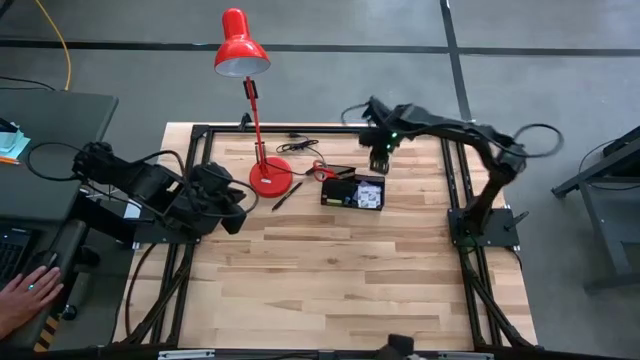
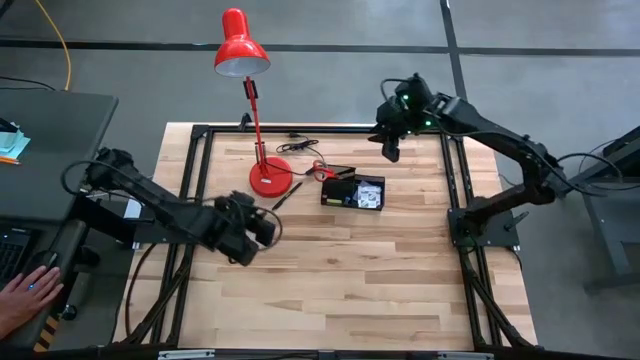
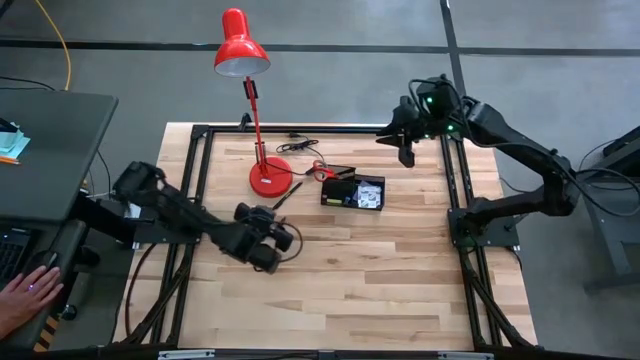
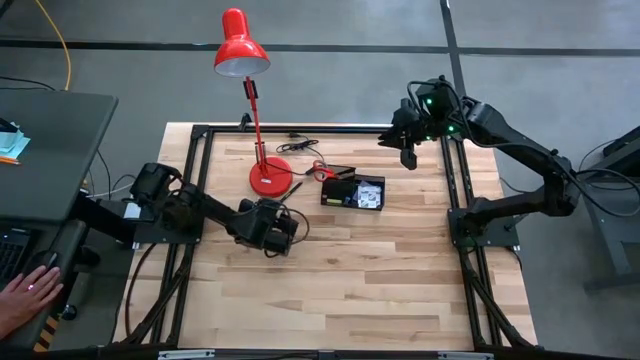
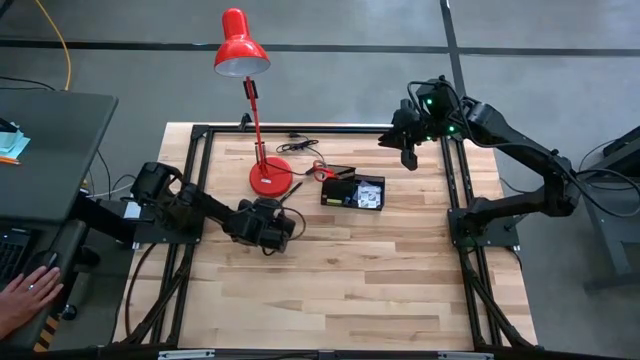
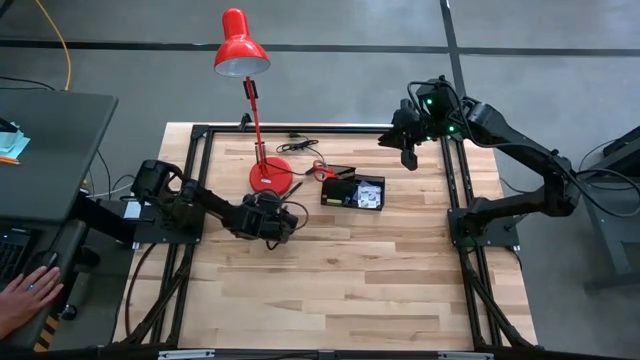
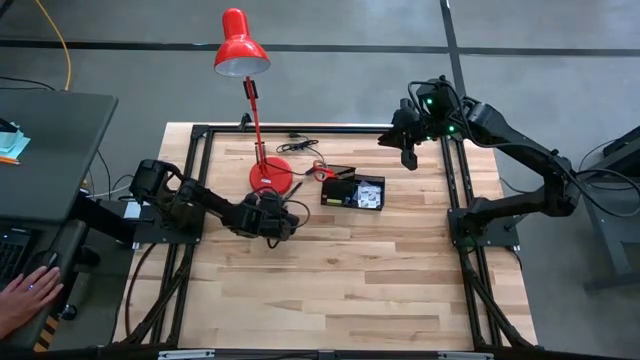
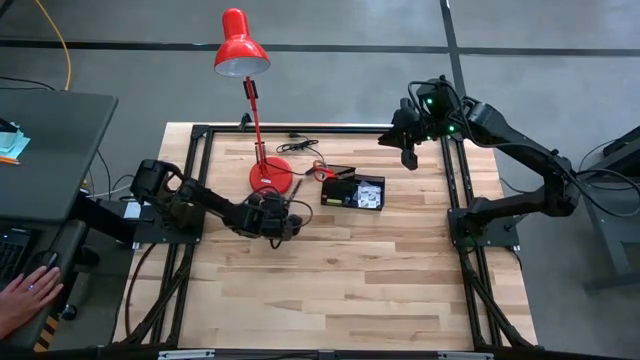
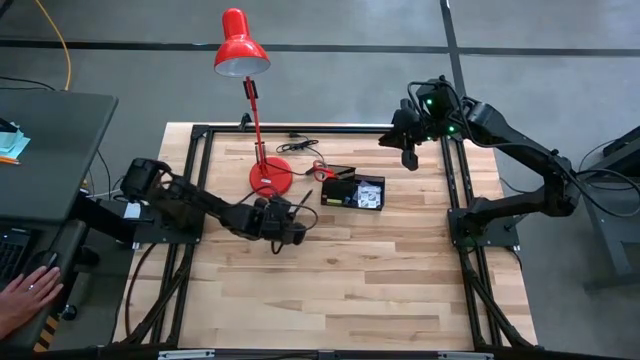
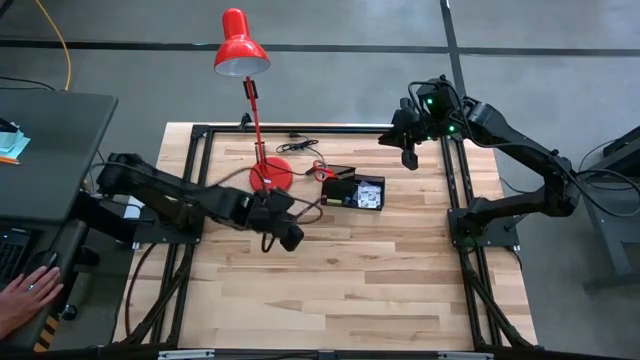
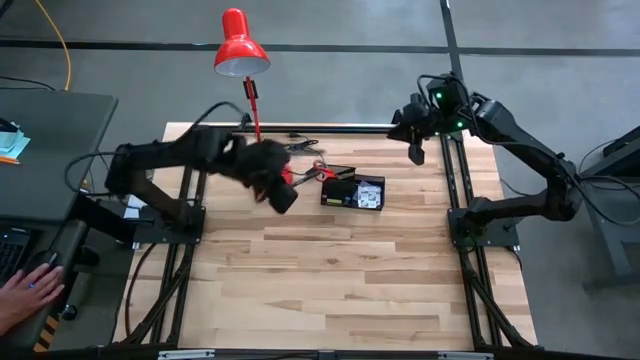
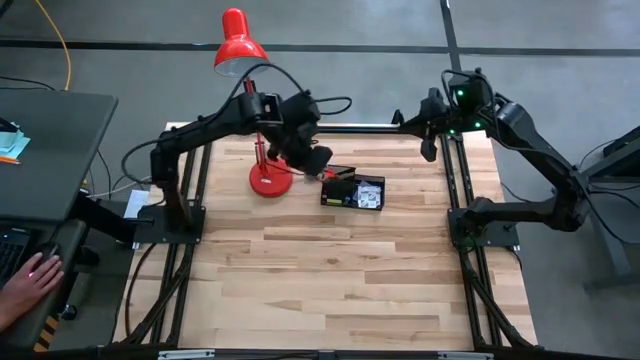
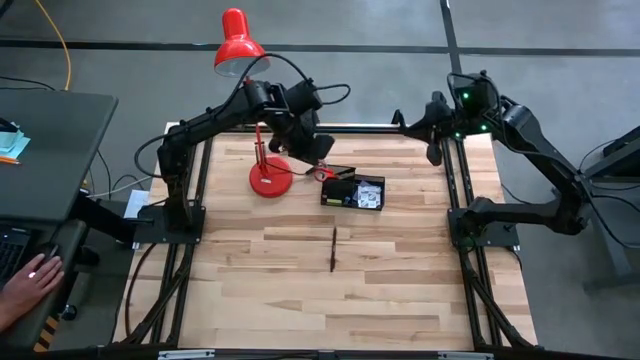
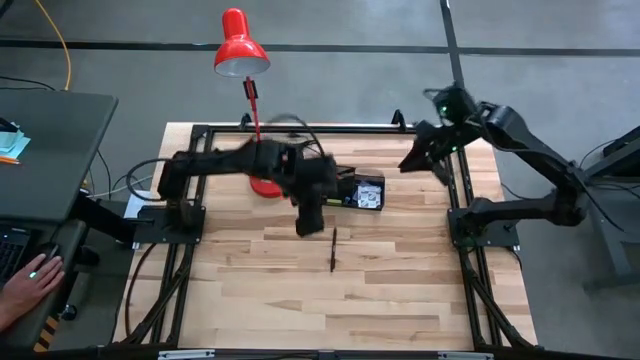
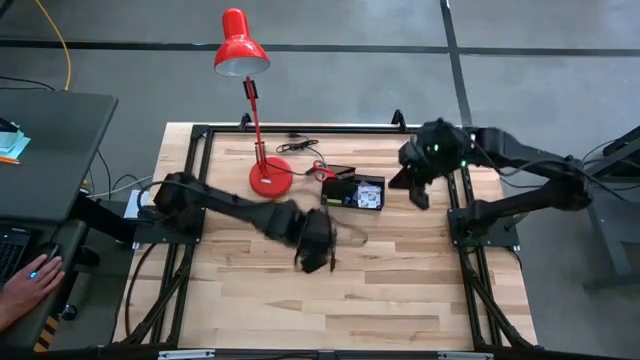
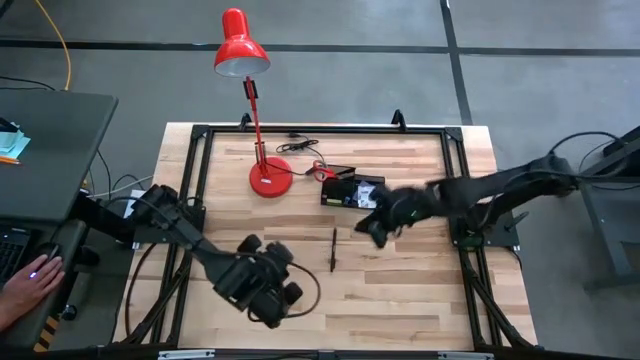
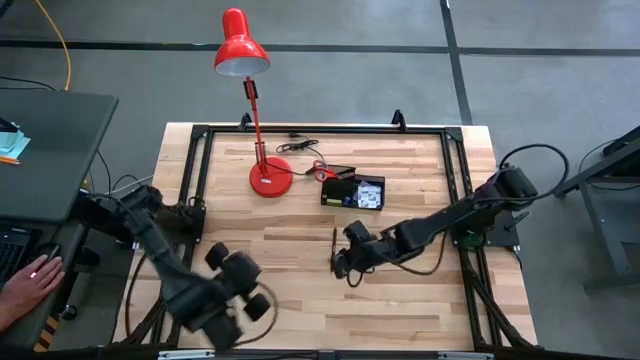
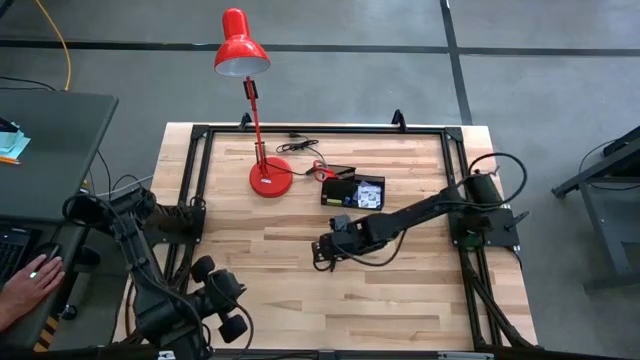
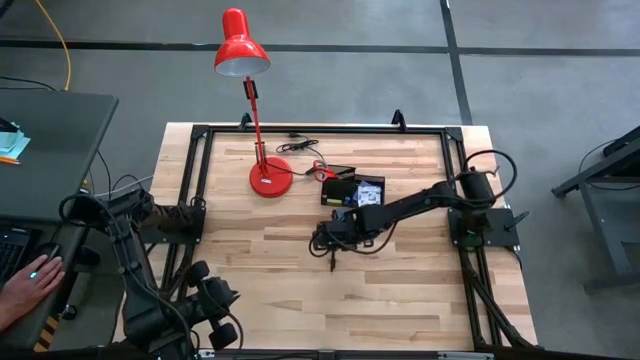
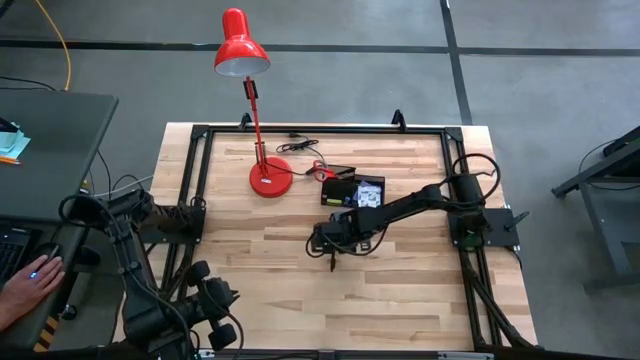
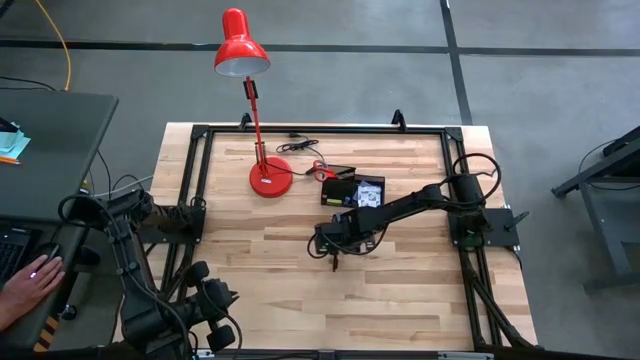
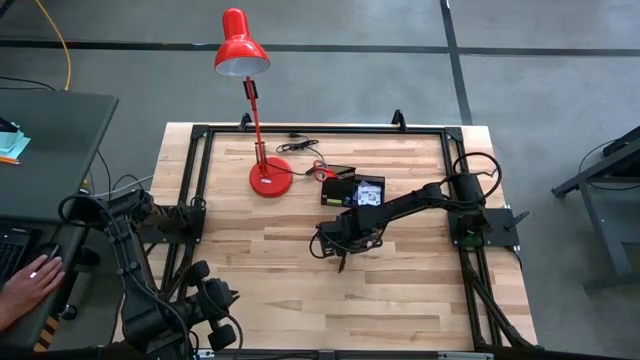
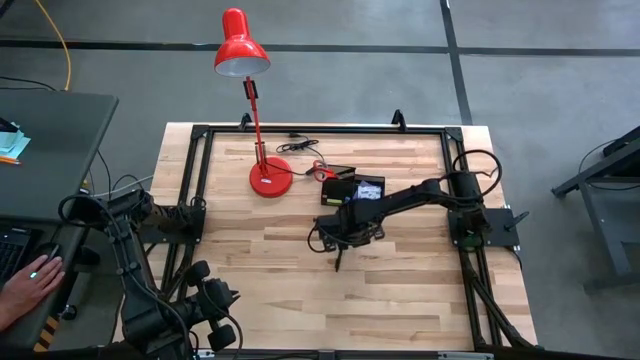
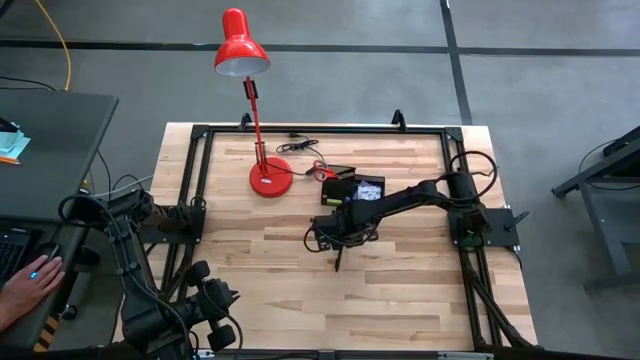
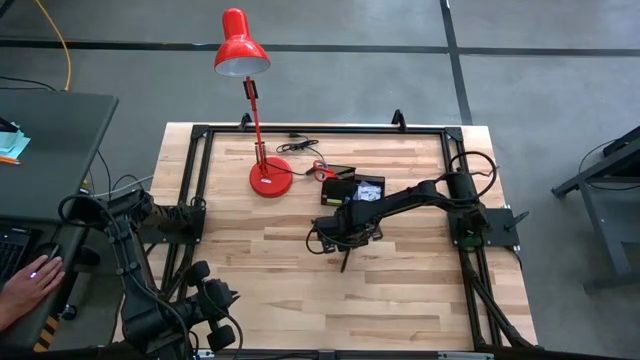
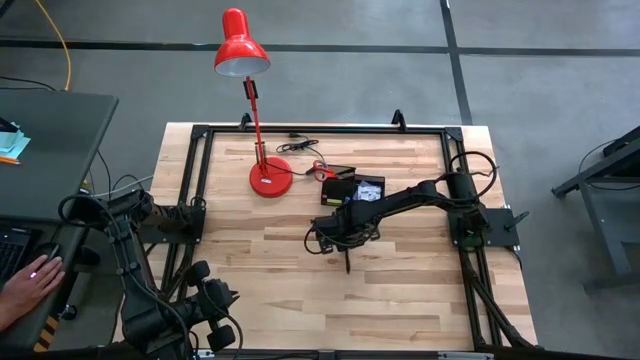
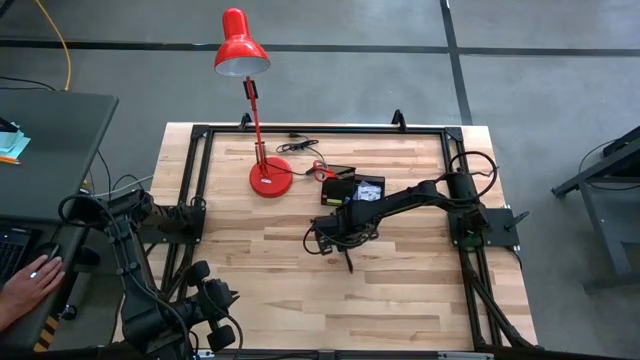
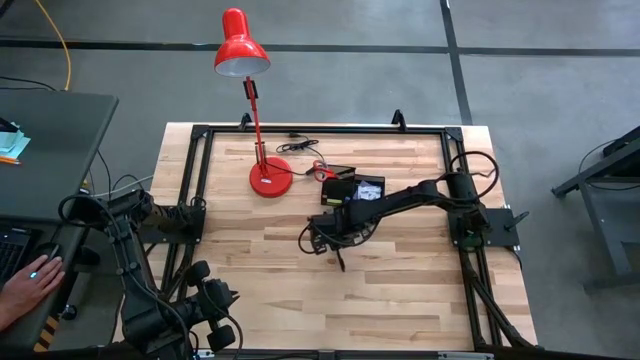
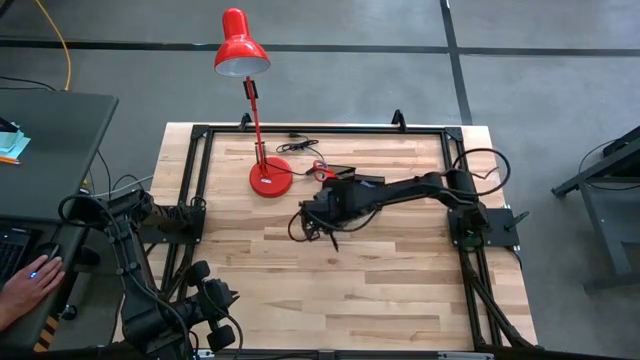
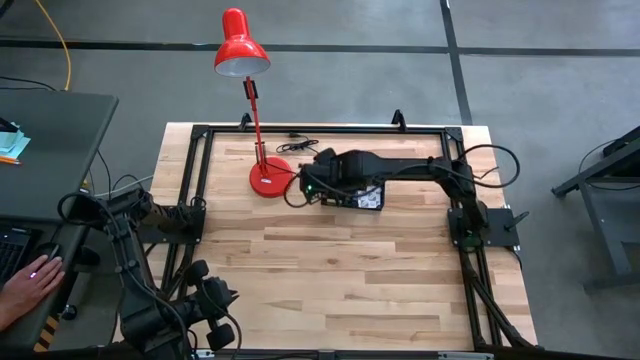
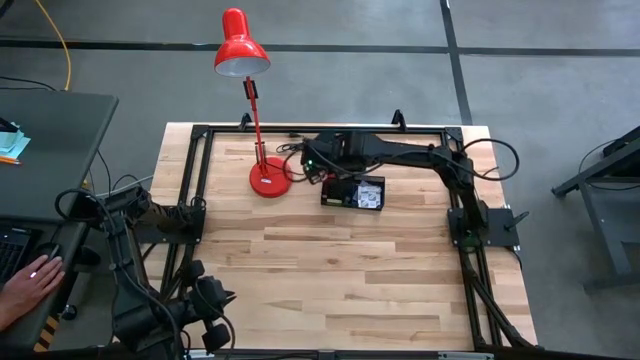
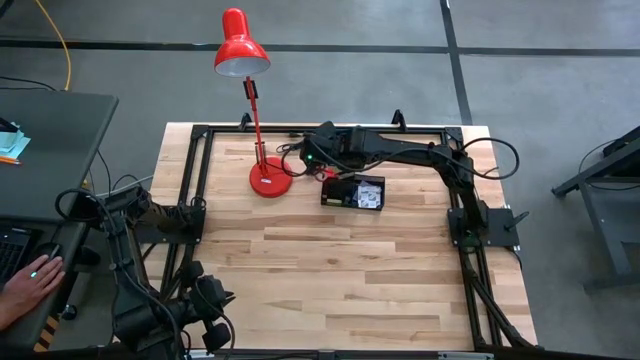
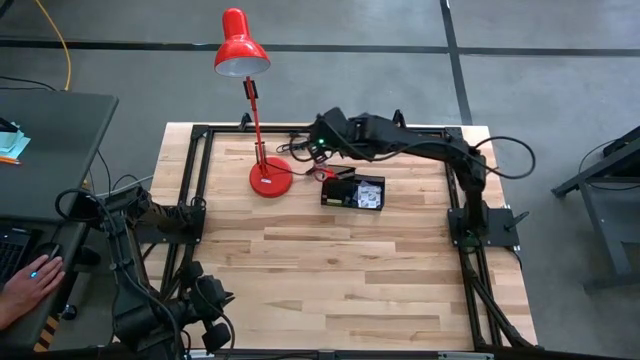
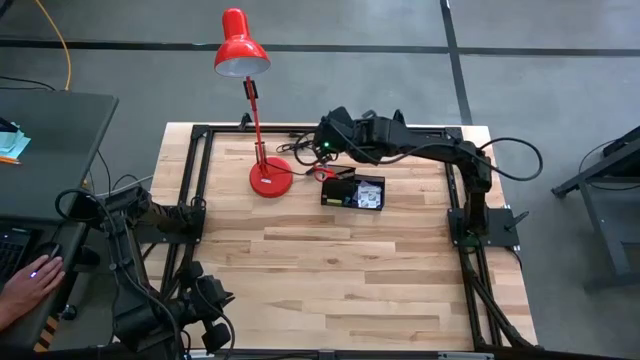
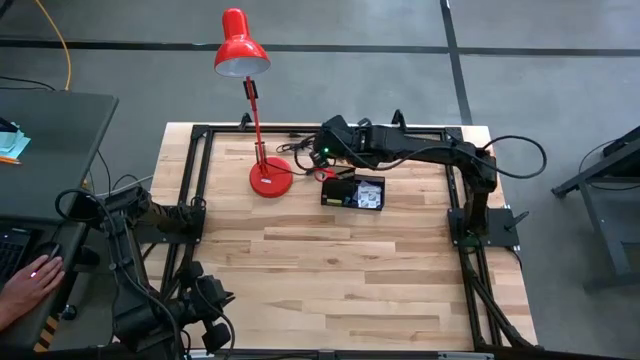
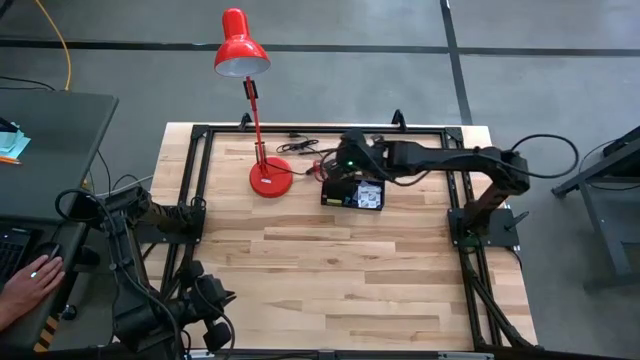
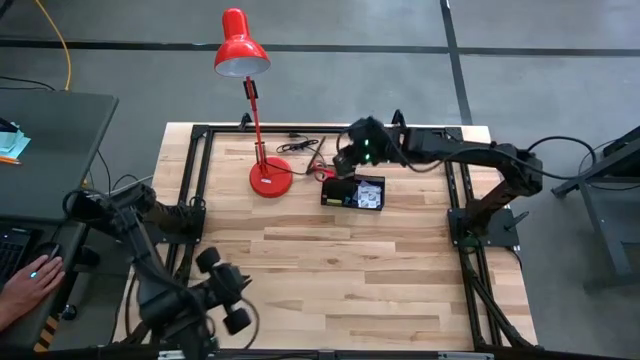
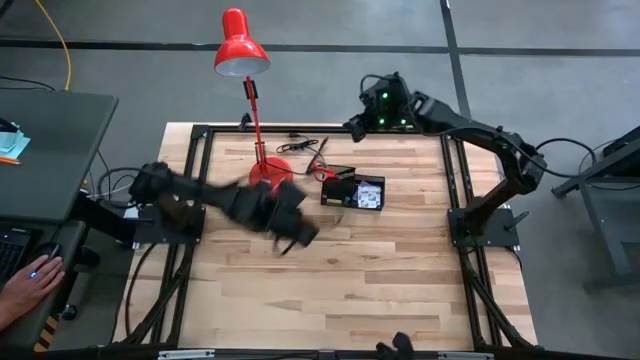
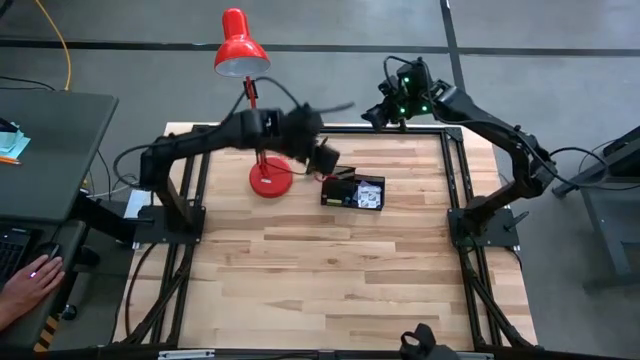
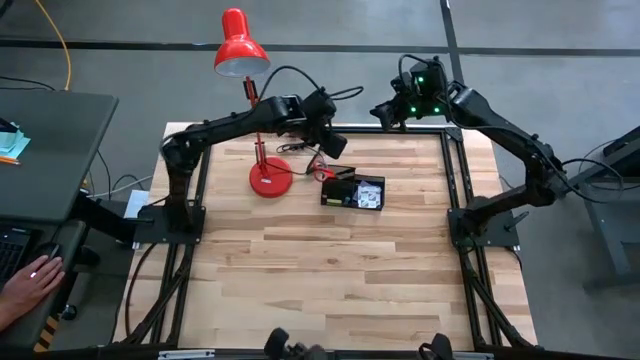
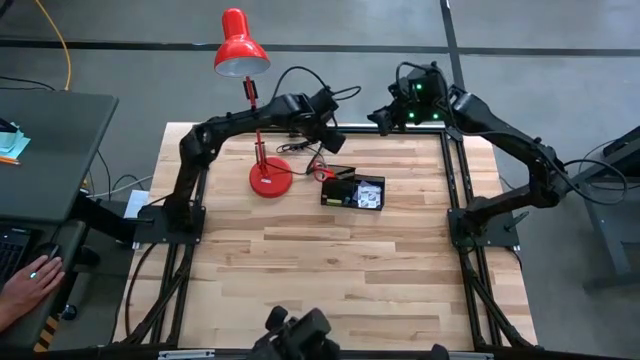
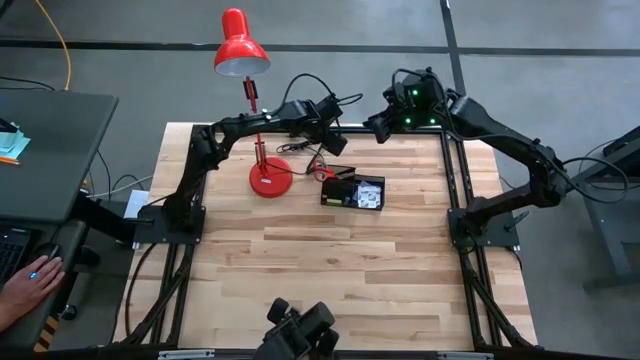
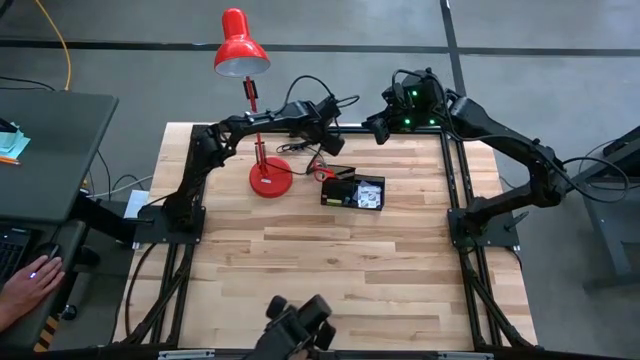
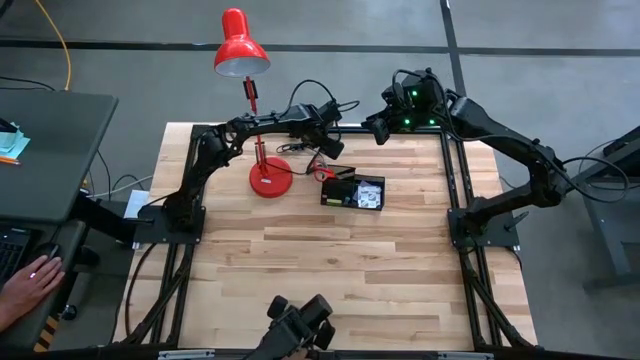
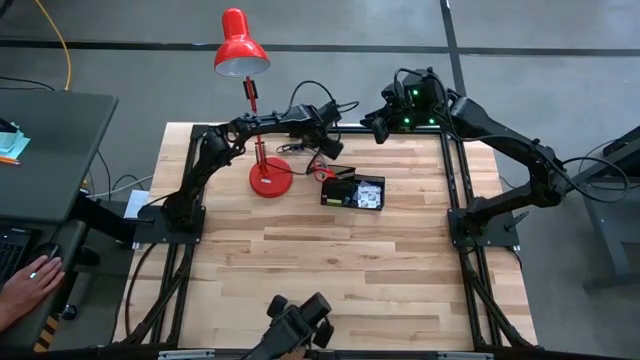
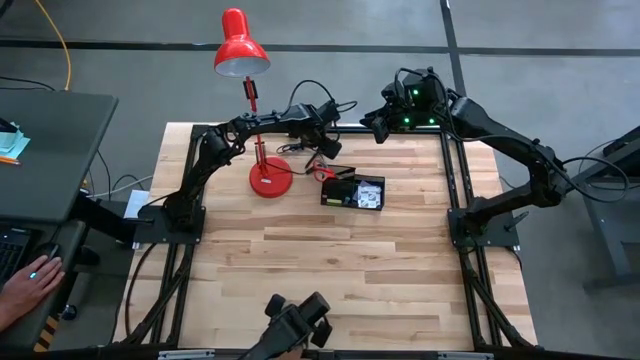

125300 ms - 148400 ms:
Task: Pick and place office supplies into organizer
Put the pen into the desk organizer
